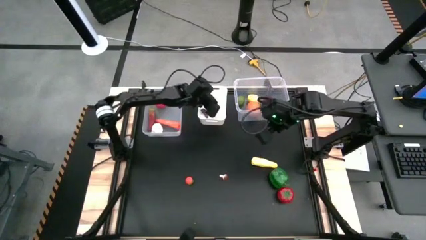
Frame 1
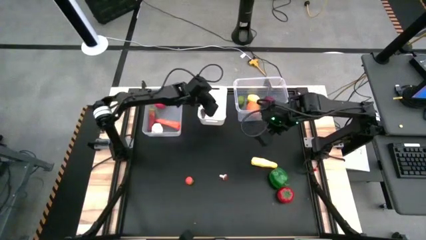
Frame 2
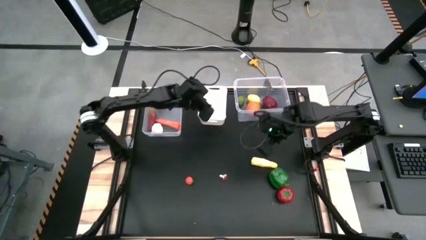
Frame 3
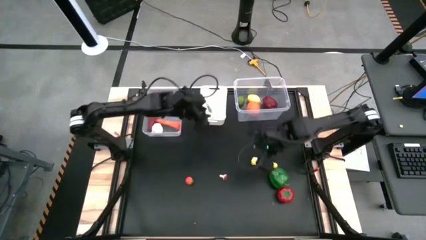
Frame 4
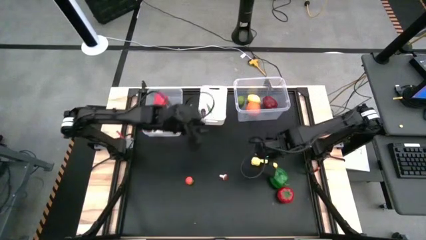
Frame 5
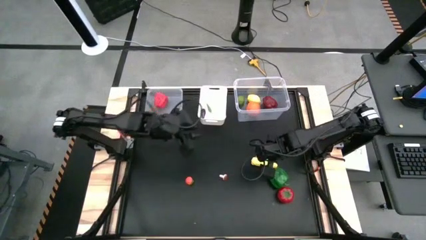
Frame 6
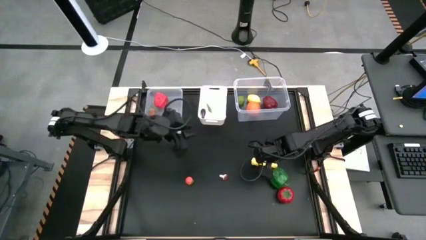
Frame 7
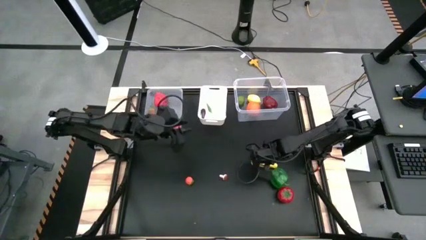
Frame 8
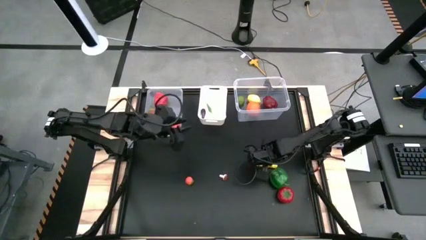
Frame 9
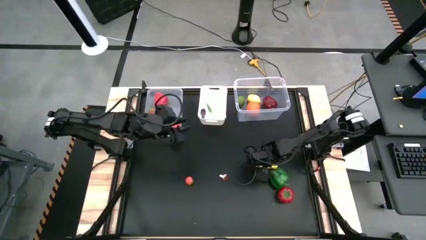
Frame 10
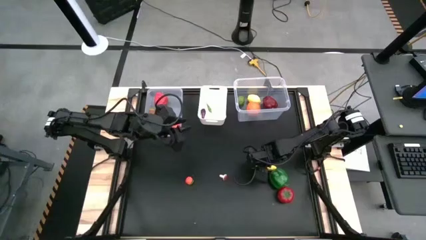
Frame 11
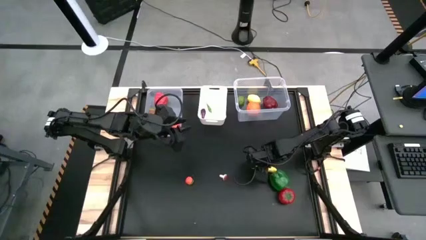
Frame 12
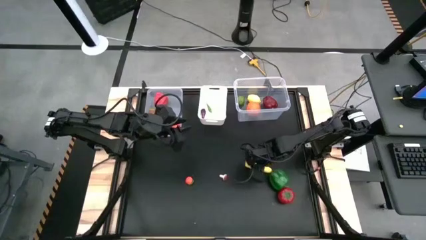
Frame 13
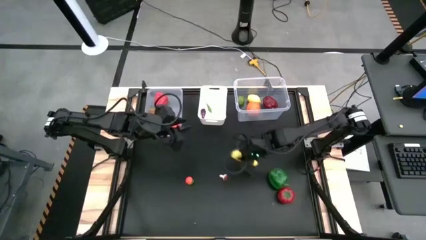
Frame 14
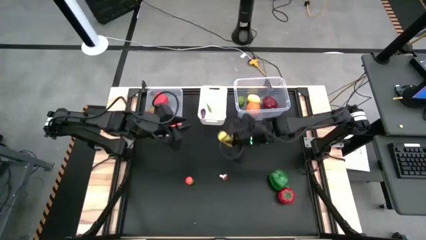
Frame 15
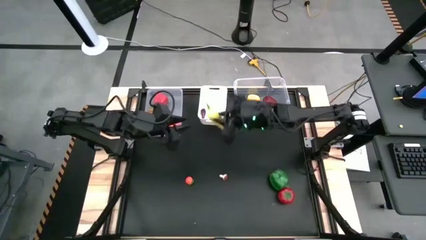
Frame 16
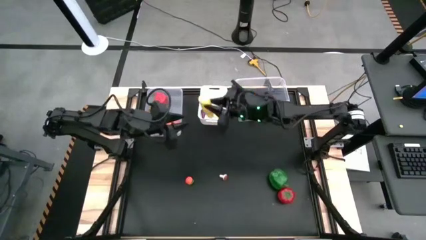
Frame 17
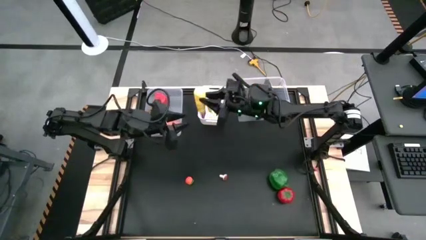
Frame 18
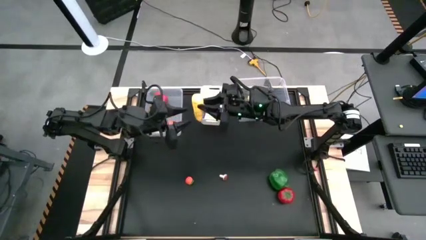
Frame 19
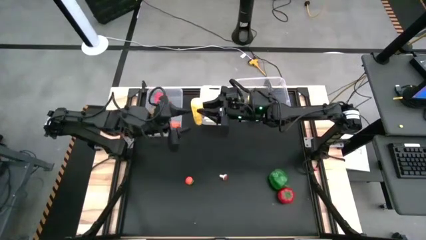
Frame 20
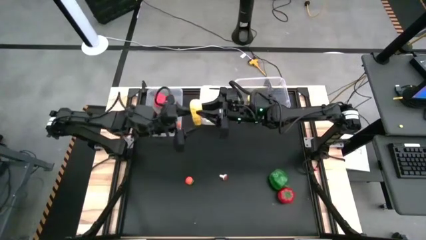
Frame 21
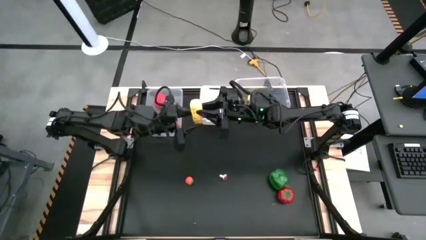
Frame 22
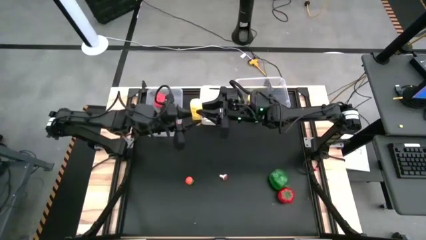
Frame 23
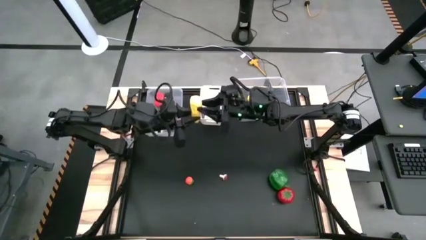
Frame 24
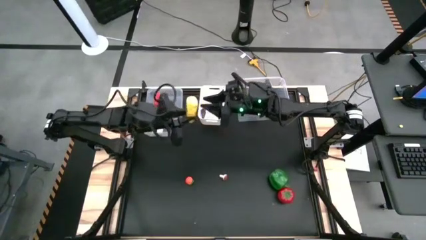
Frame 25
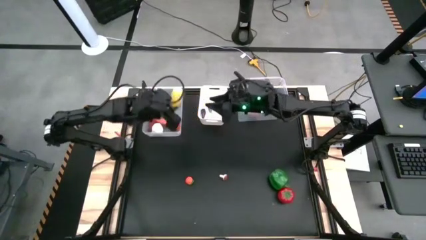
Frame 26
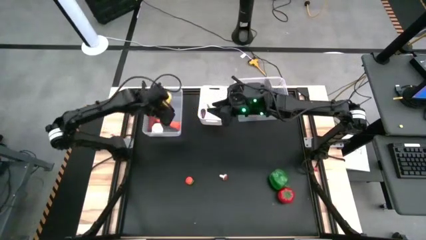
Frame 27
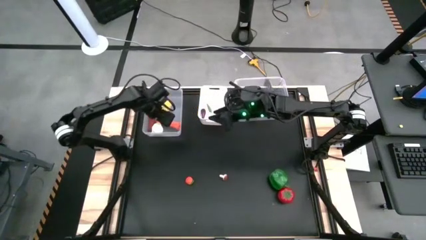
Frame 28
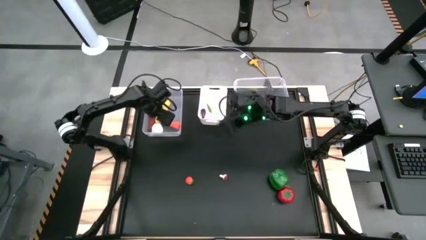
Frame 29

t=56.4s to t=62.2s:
Task: Sort produce into baskets
Put the yellow corn into the left transparent bin

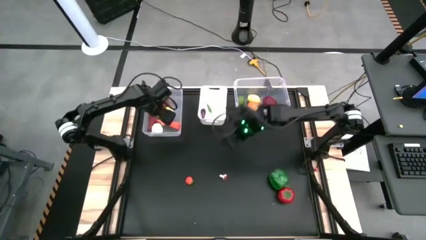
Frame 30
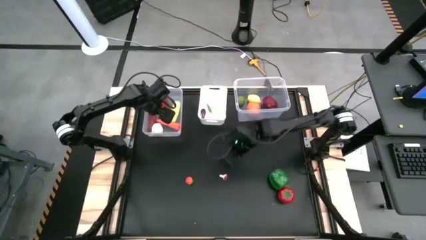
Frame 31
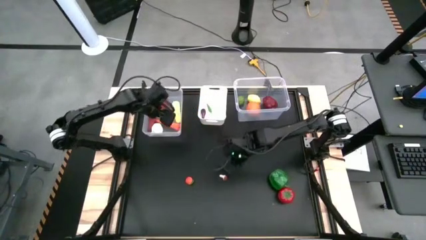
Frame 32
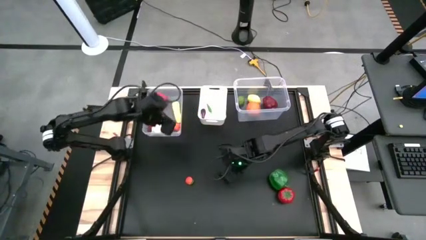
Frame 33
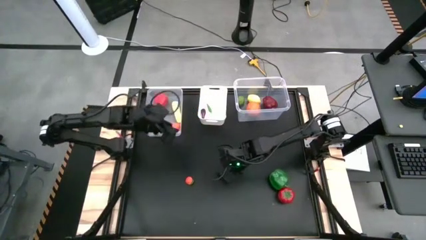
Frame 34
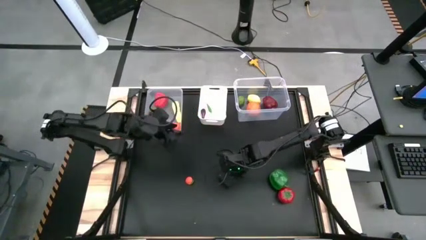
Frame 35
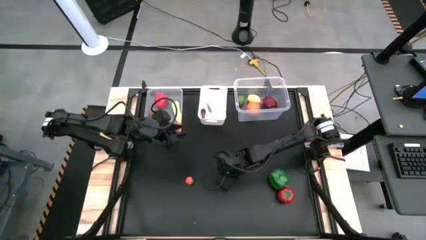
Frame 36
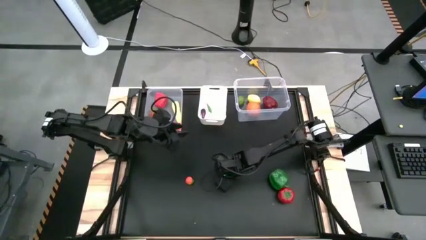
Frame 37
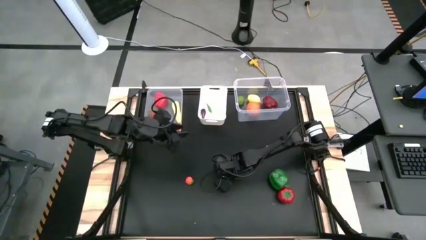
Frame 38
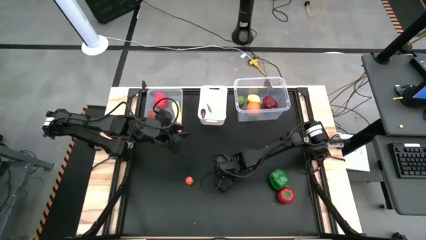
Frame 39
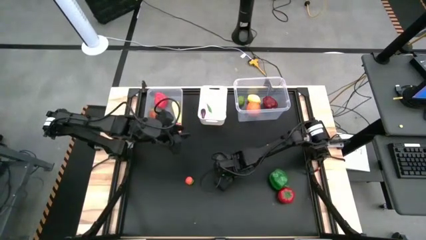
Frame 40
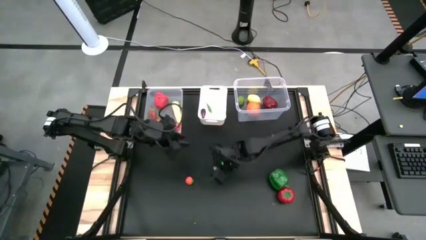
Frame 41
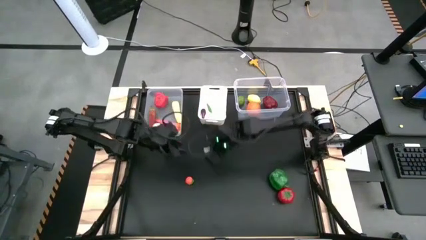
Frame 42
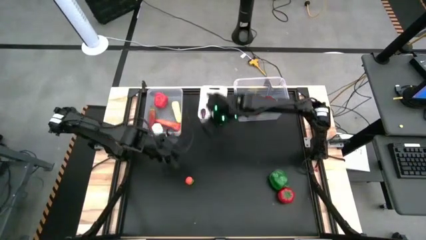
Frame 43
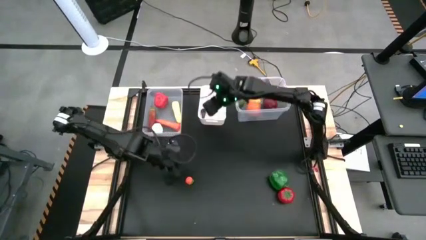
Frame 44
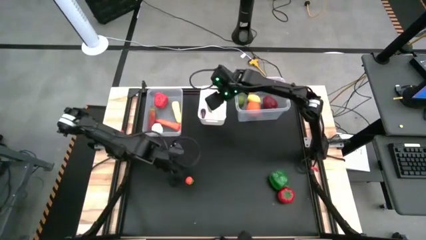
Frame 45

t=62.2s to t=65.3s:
Put the brown mushroom into the white bin

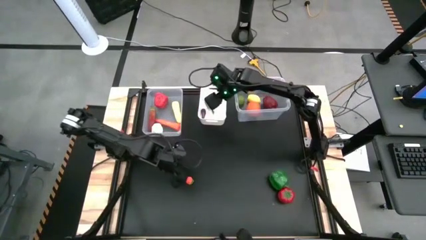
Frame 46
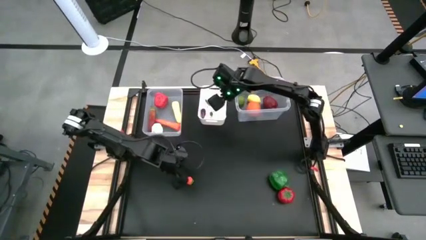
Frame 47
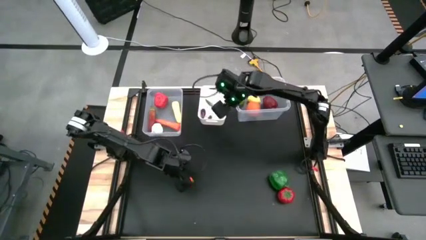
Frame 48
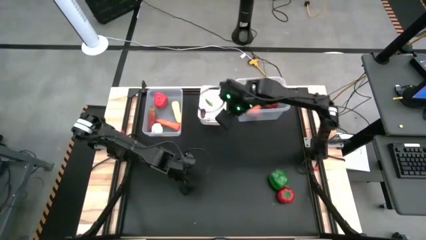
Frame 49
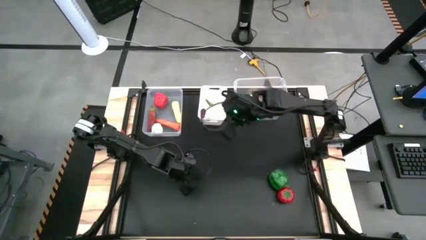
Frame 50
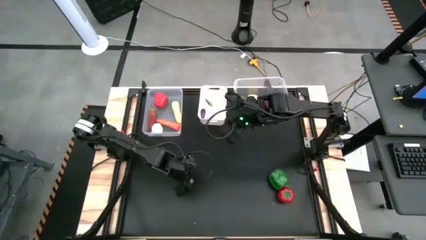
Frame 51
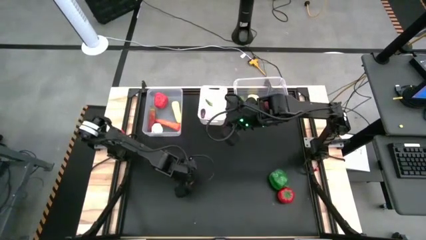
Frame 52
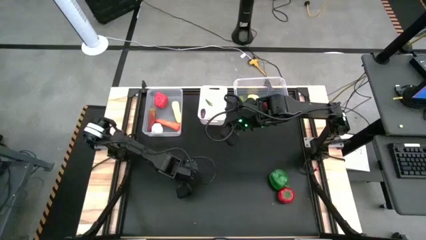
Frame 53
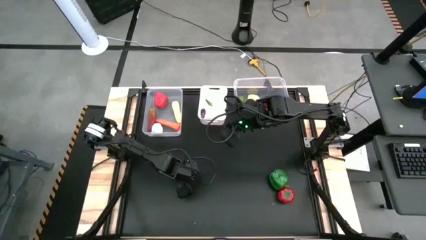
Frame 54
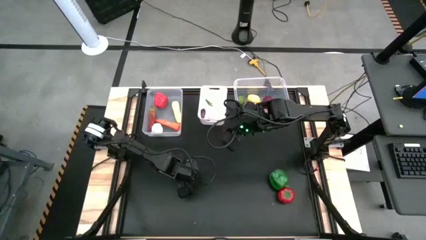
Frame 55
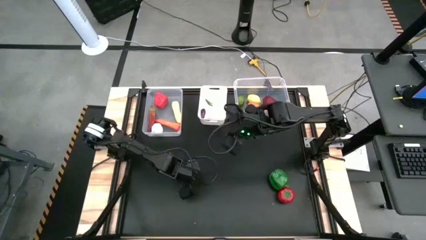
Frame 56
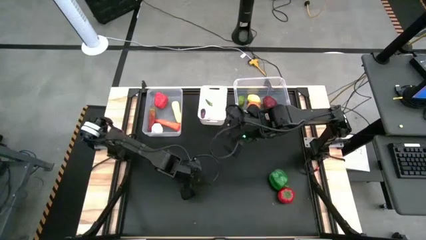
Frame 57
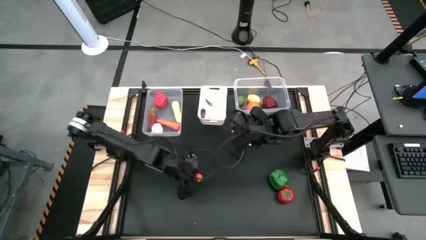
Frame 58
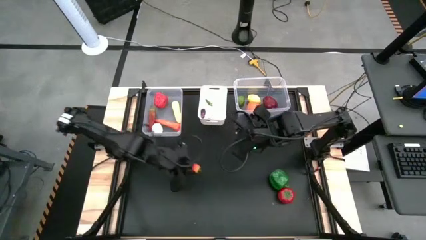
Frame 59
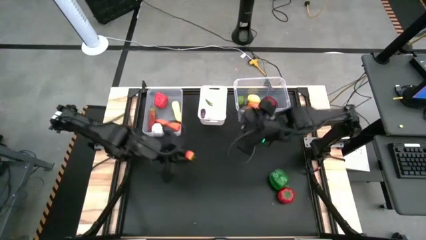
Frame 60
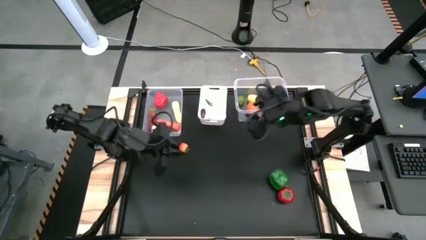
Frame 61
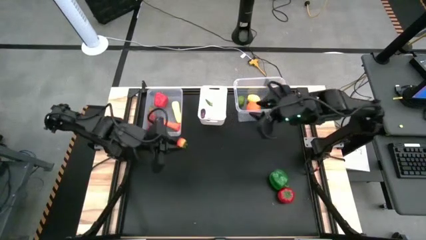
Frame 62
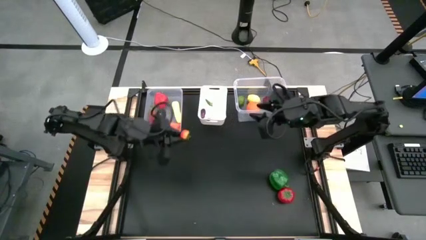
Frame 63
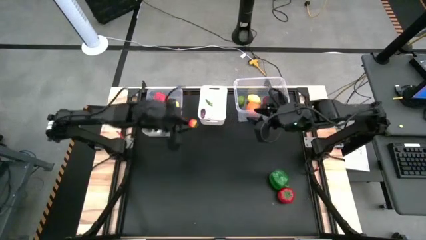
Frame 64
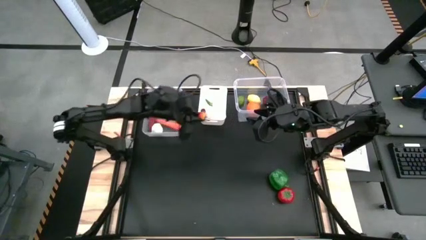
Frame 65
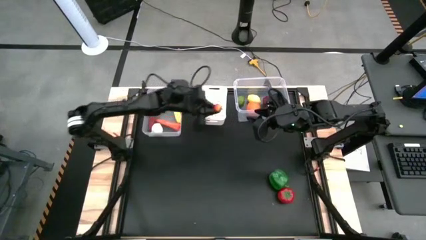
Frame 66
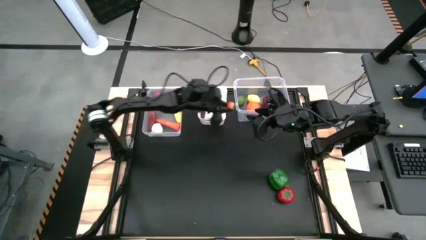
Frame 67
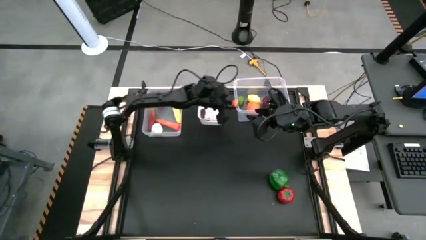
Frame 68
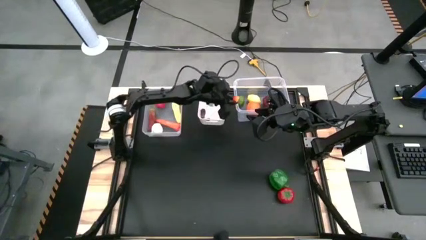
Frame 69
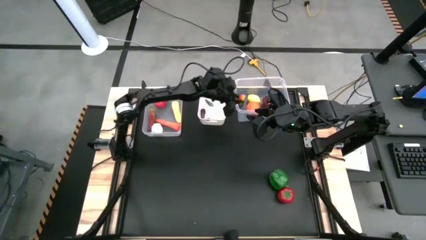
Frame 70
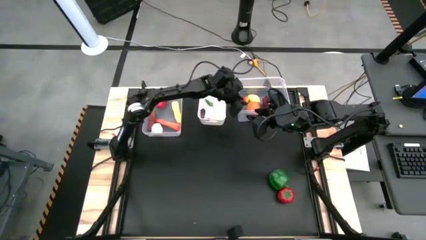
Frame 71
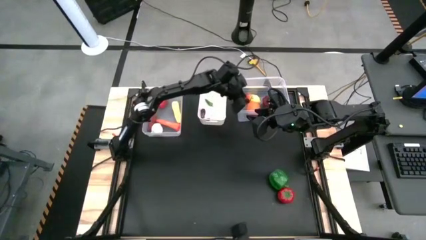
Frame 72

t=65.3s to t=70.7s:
Put the orange tomato into the right transparent bin

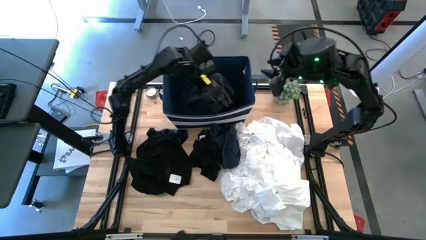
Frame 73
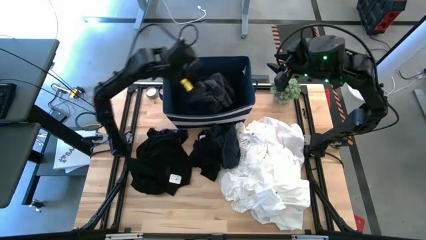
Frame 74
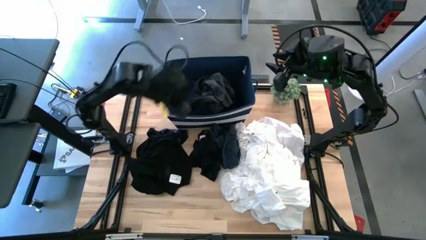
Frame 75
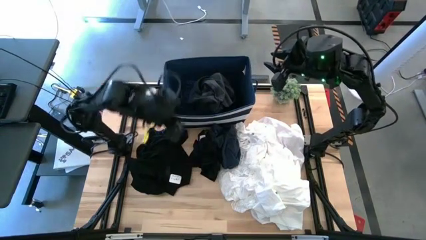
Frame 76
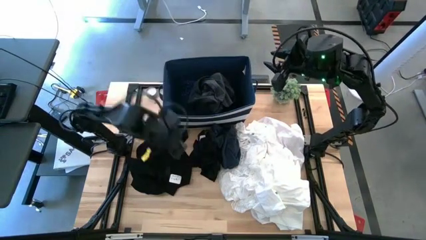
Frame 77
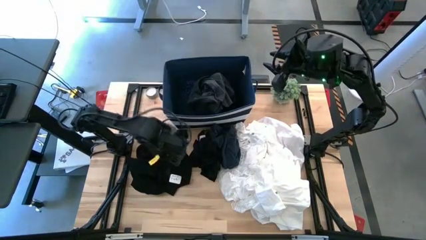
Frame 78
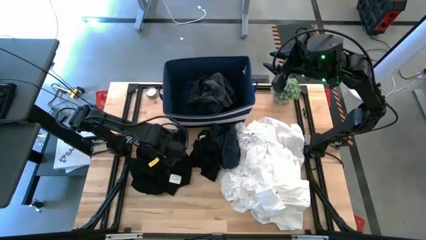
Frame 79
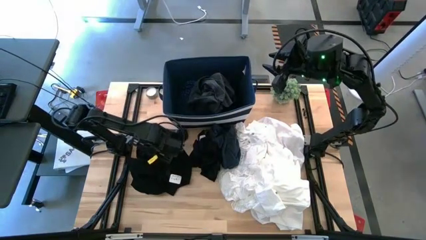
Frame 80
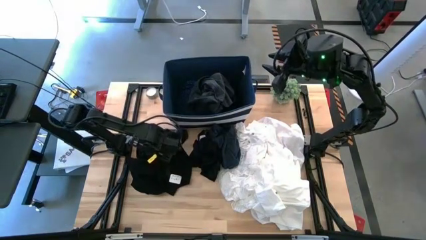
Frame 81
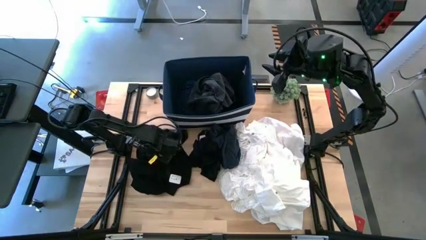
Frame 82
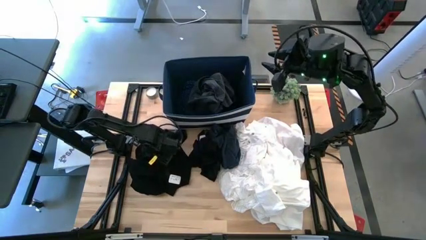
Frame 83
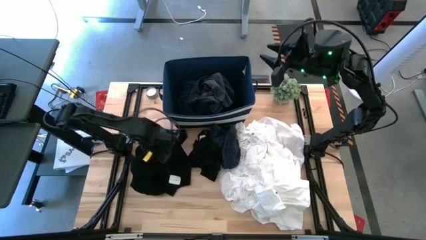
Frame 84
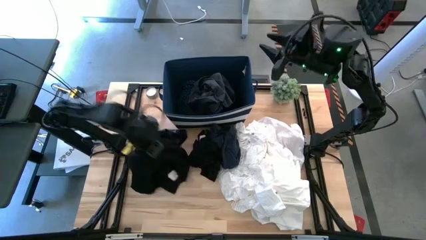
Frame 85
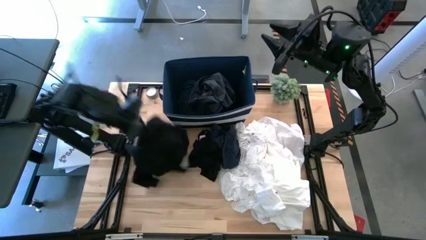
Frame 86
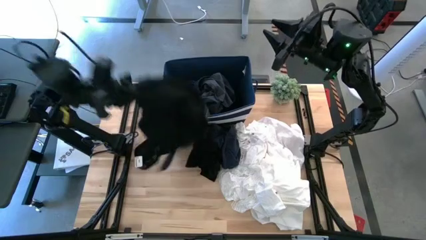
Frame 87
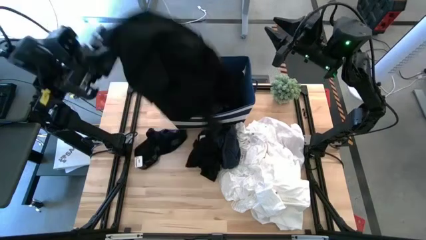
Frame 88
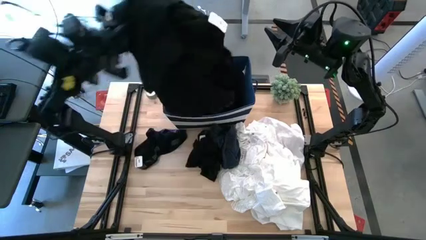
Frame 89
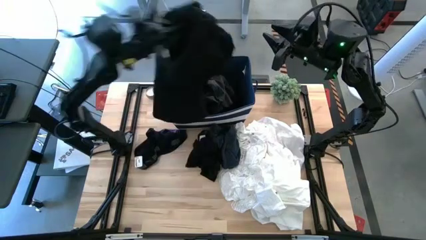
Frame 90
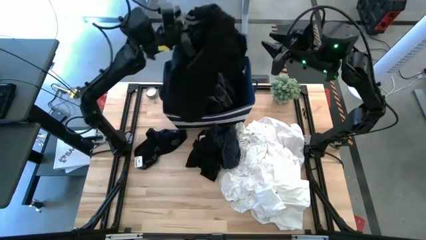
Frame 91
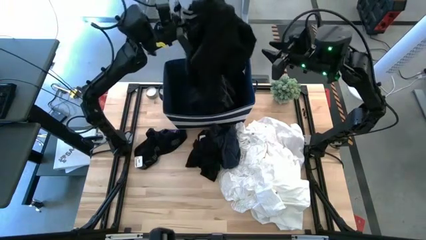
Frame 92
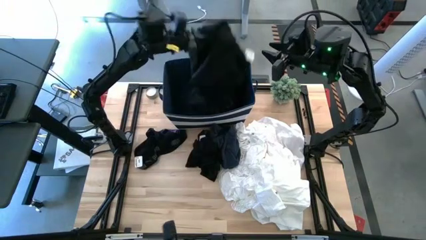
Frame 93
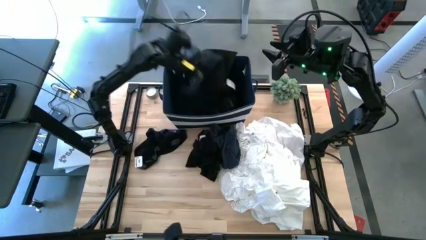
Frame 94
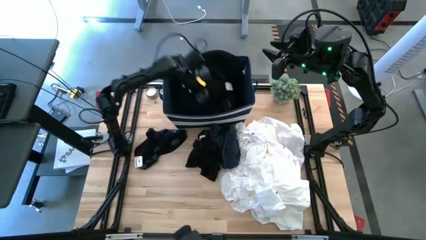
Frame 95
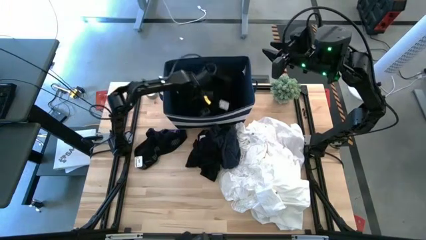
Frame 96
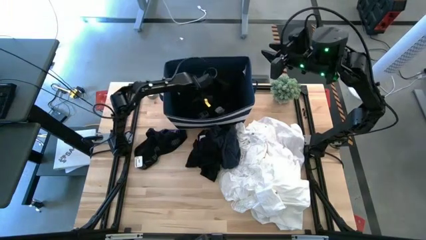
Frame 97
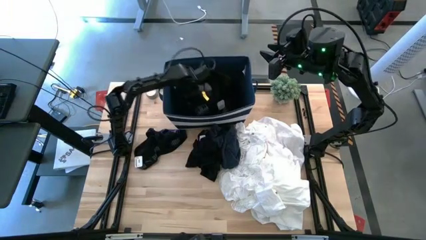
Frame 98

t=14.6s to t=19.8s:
Task: Sort clothes
Put the black shirt into the blue bin
